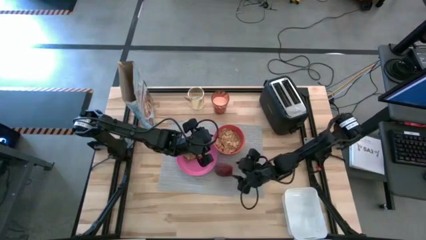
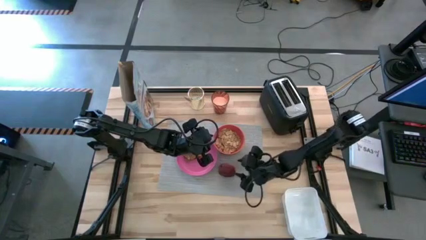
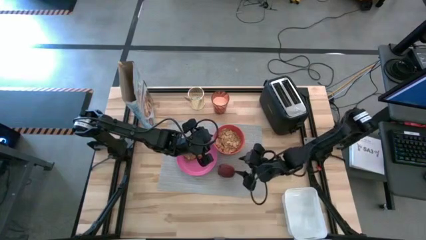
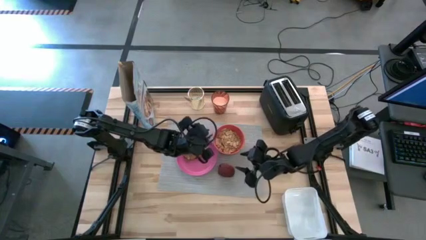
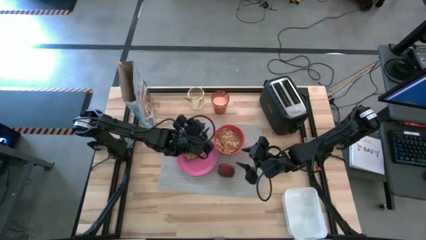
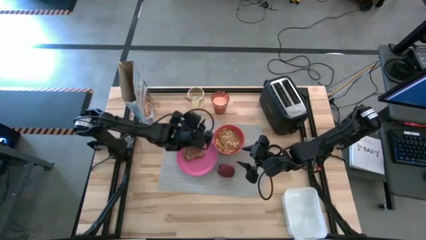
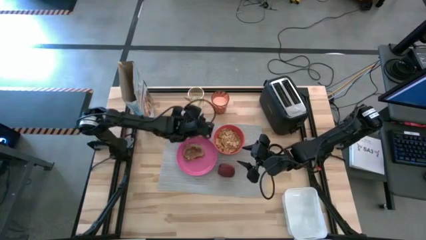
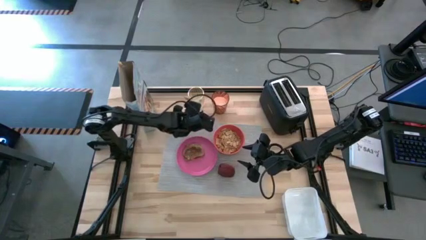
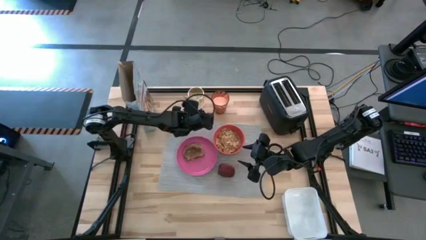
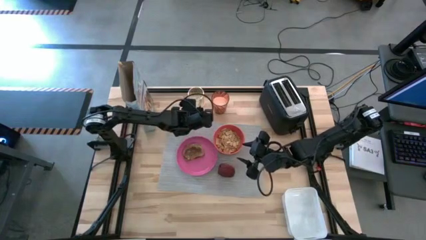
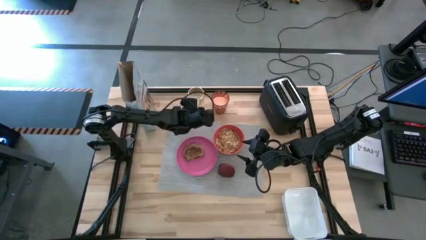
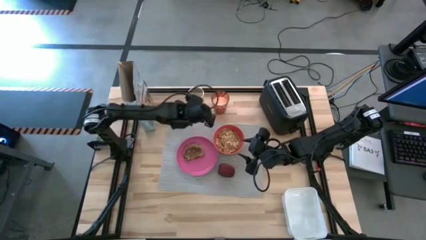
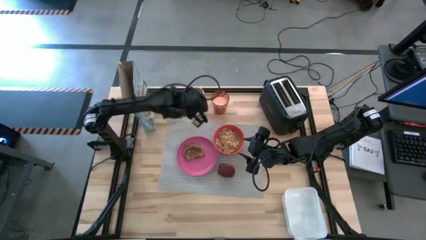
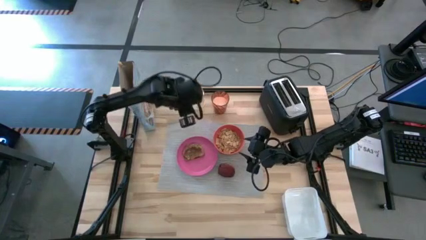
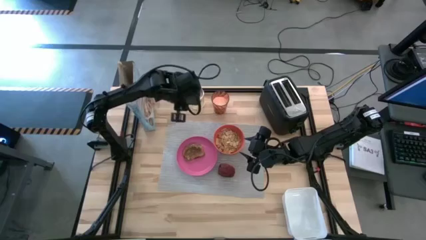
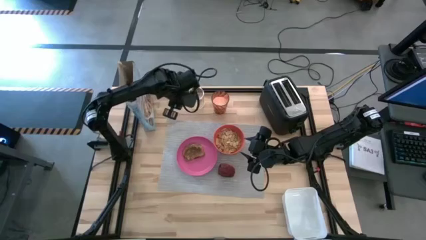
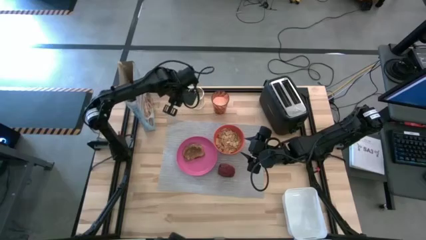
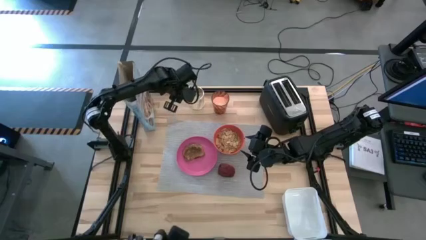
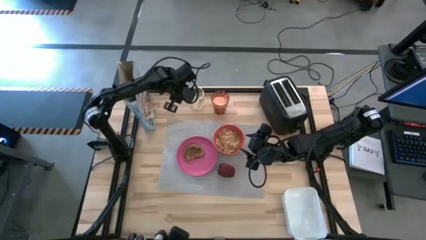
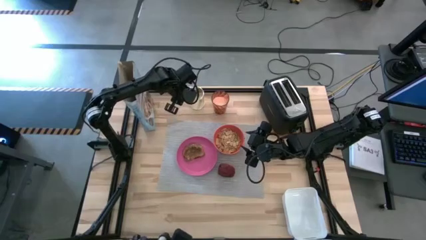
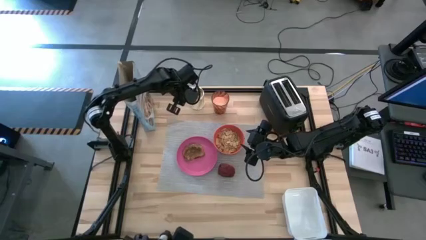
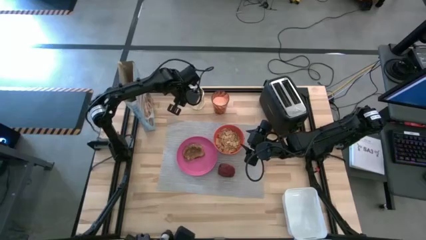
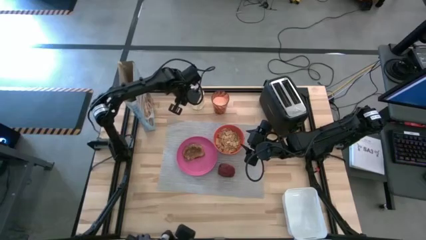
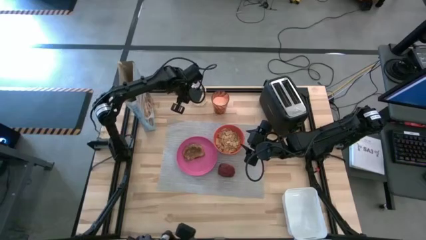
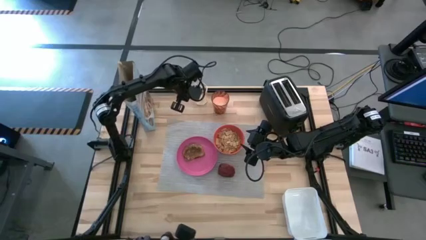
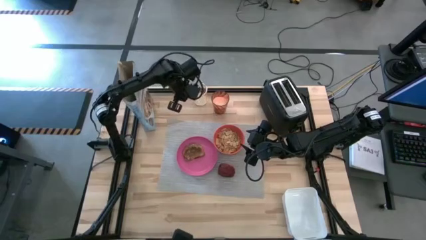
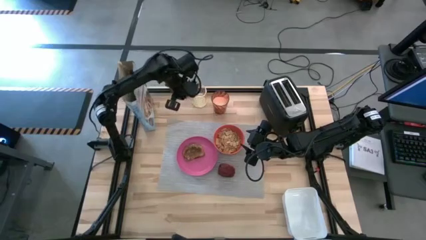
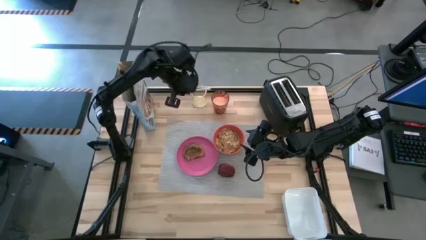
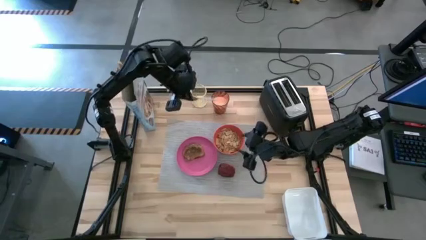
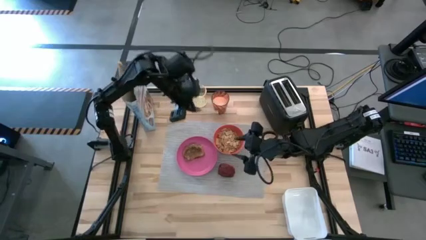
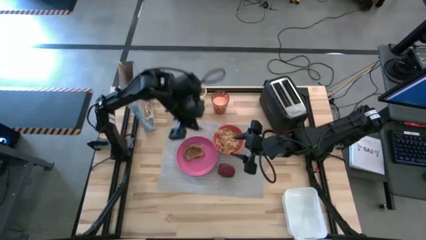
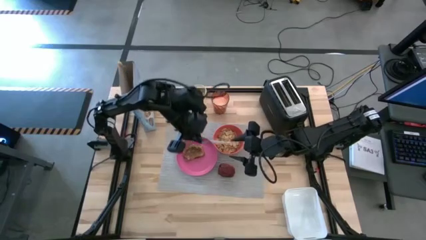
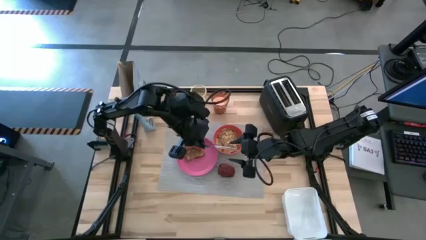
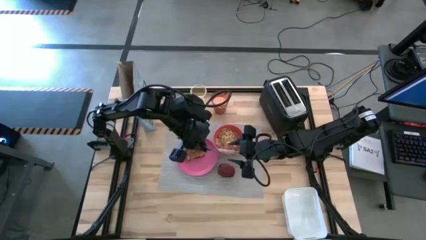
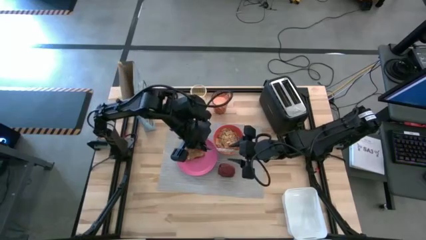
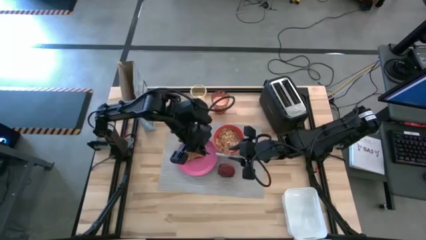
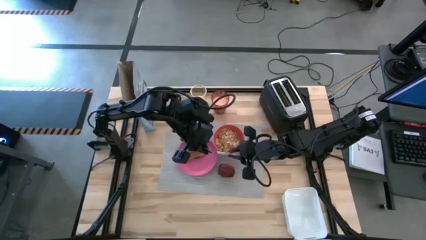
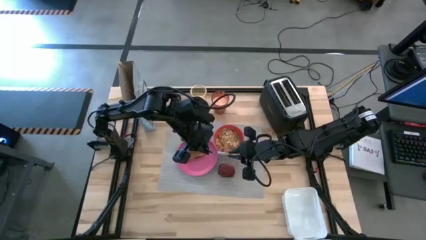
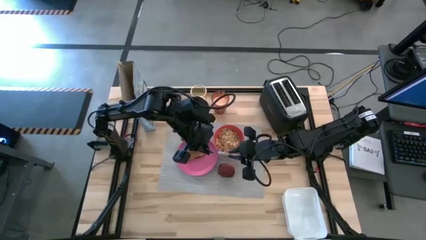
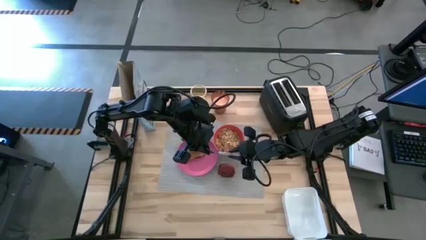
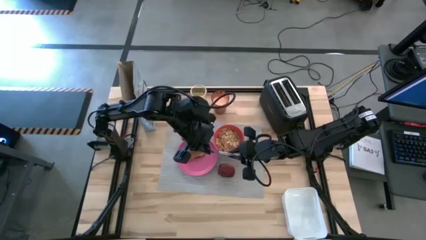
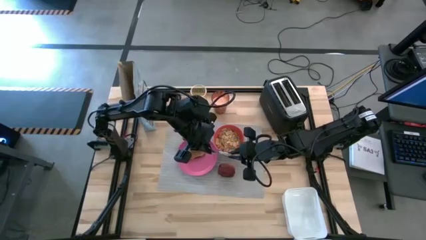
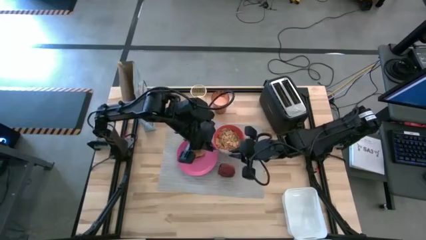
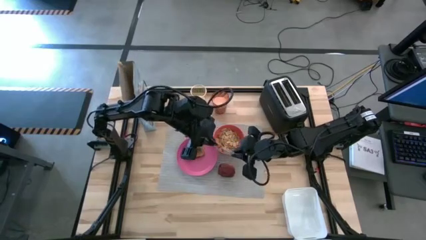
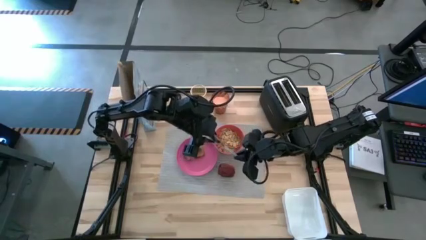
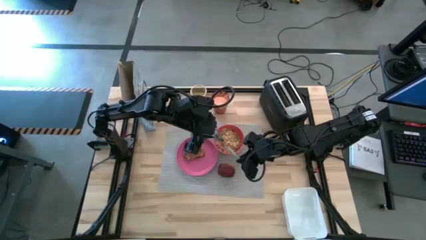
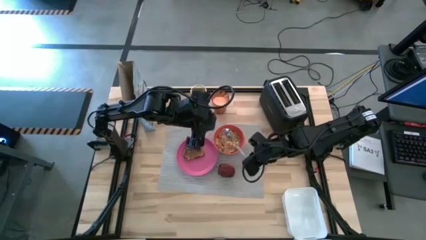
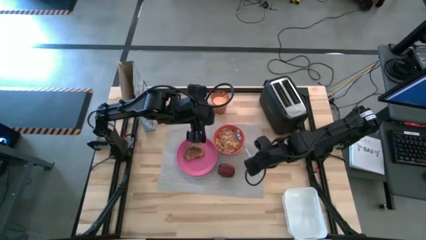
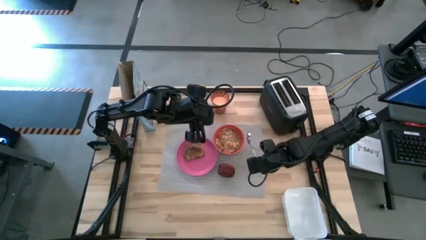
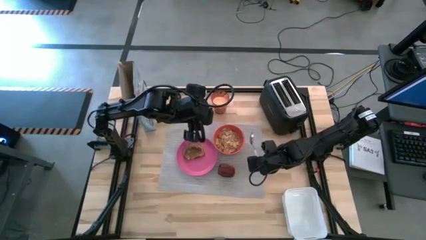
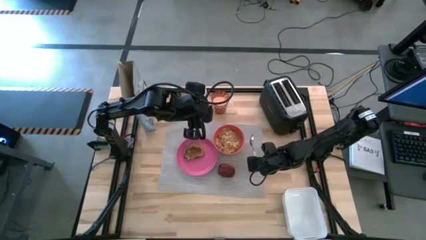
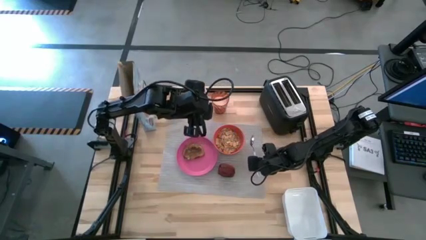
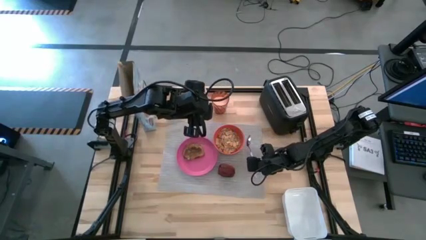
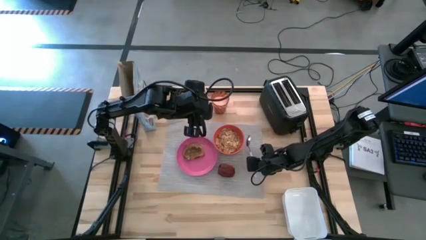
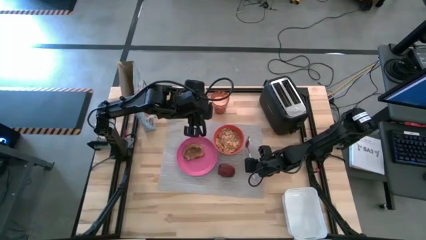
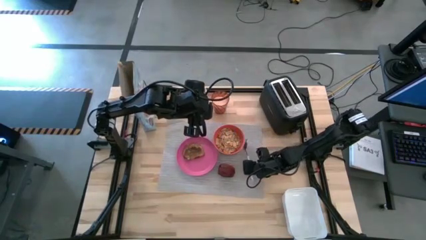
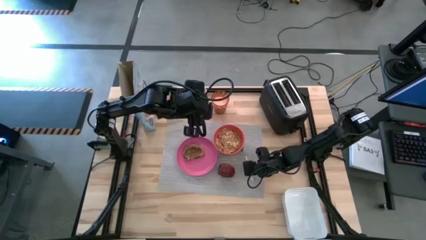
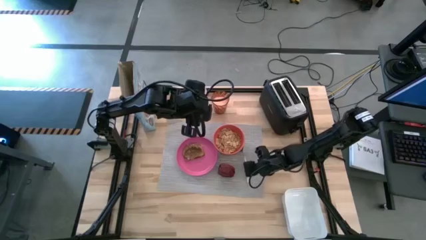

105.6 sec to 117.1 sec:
Task: Arrange a breakfast setting
Put the blue spoon on the gray placemat to right of the red bowl and apple

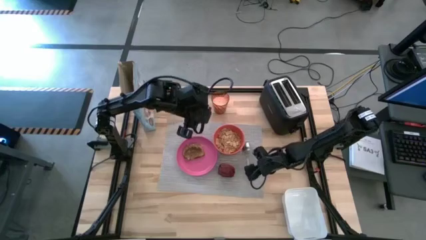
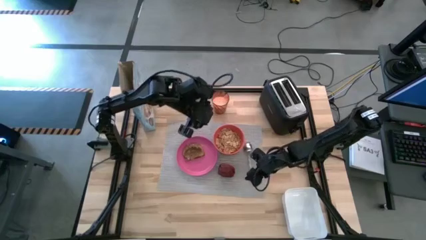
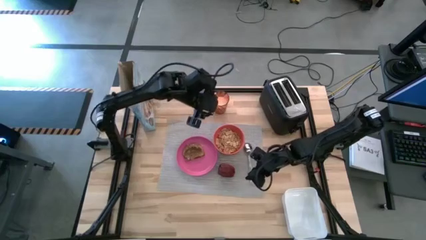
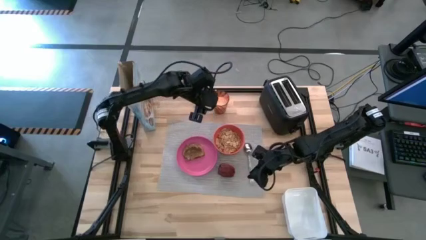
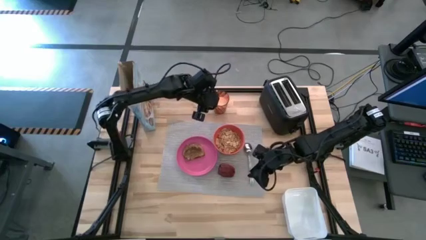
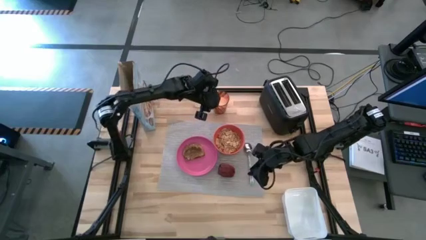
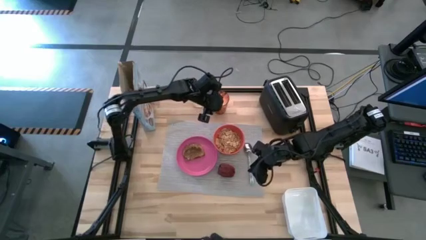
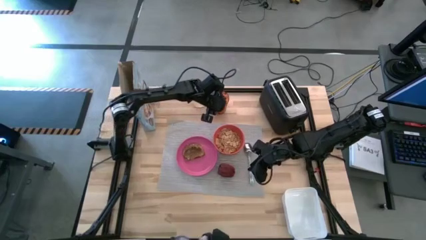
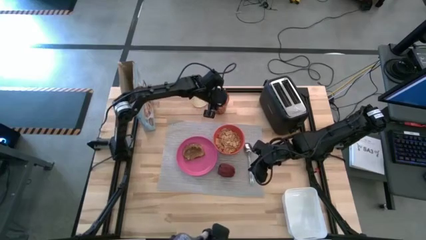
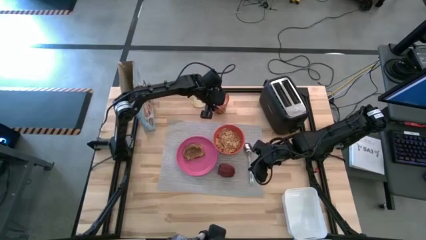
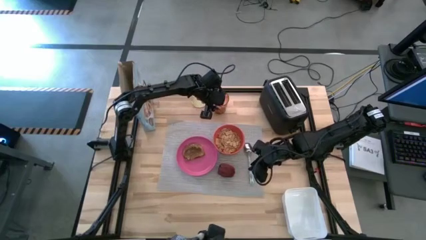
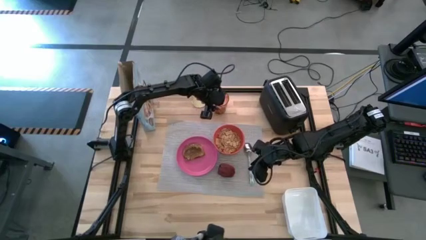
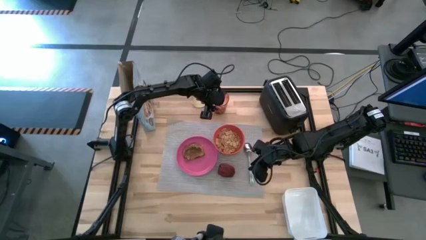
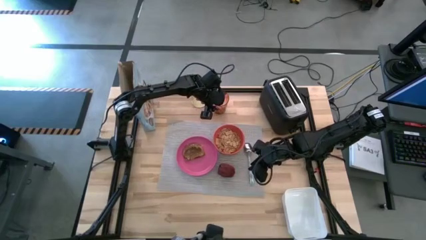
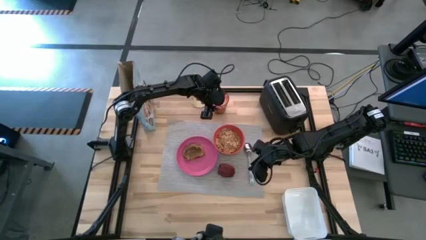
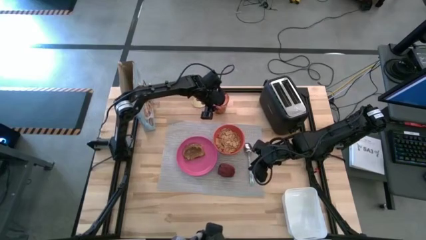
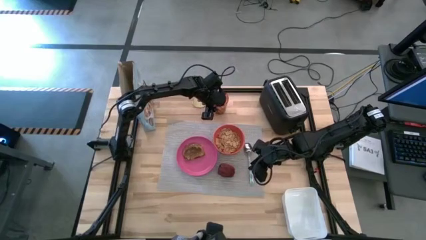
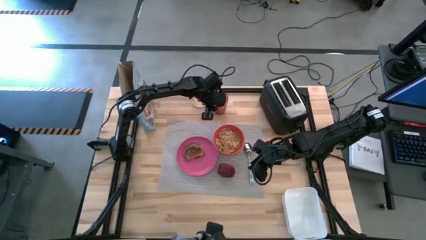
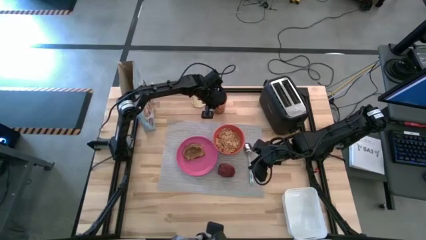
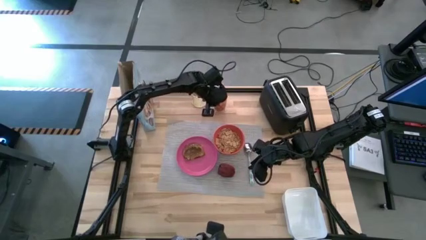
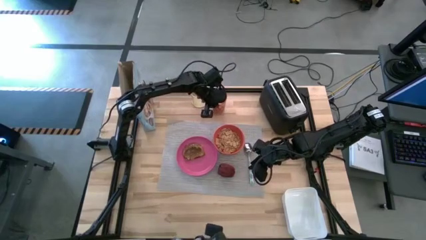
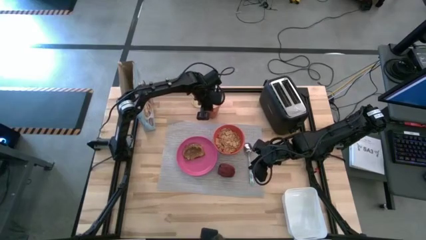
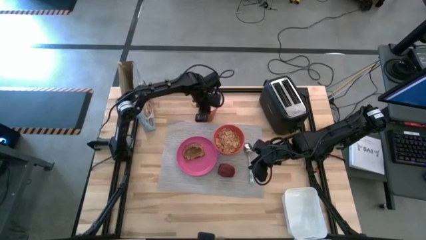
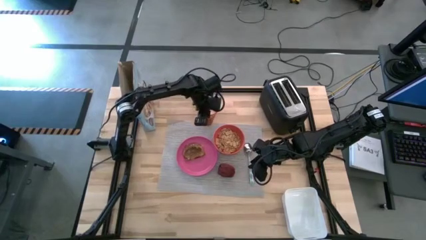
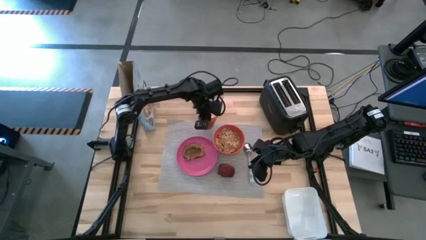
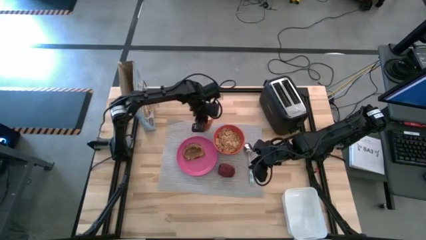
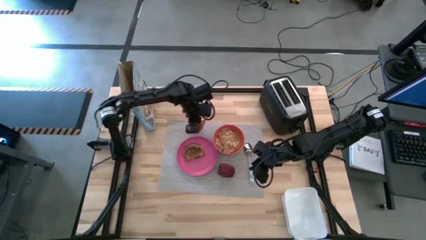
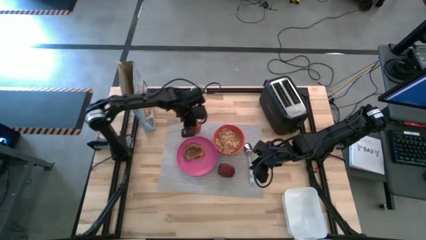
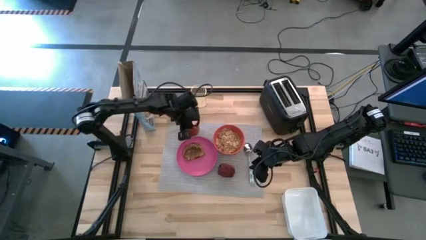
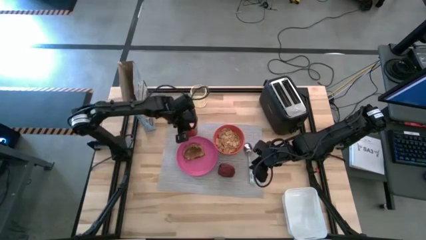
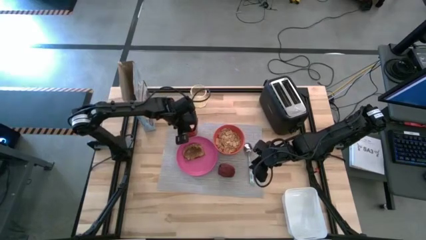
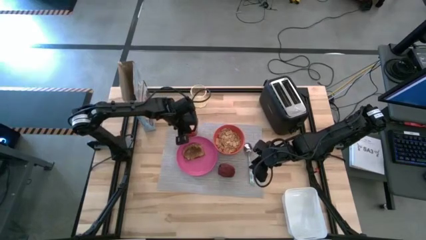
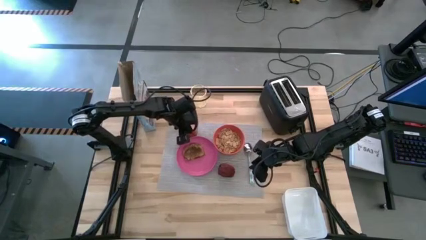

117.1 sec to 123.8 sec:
Put the brown cup on the gray placemat to the top left of the pink plate
